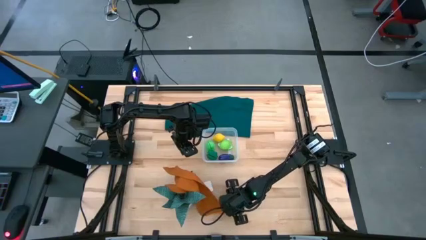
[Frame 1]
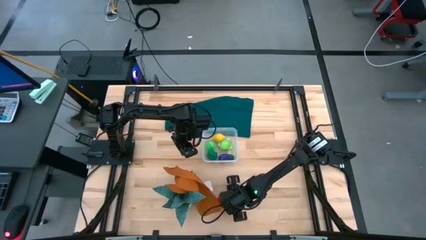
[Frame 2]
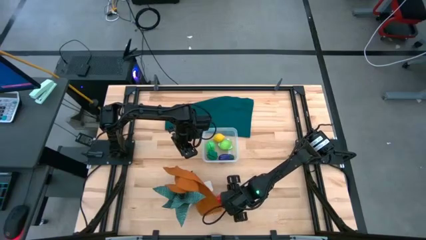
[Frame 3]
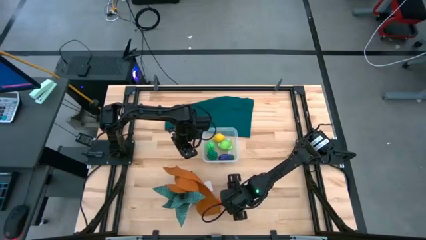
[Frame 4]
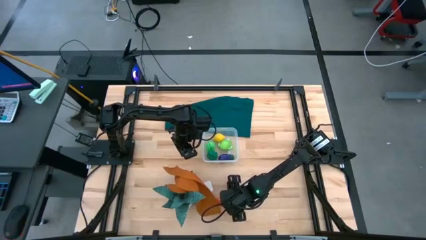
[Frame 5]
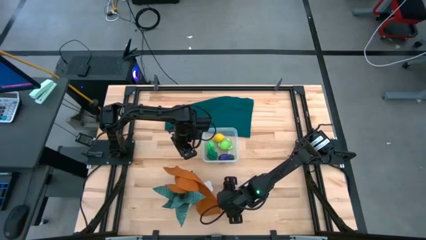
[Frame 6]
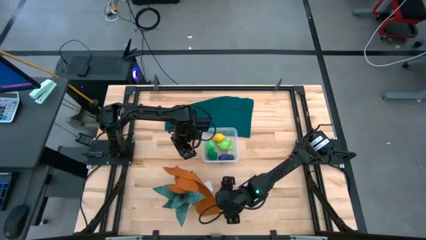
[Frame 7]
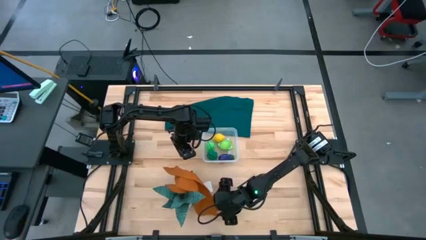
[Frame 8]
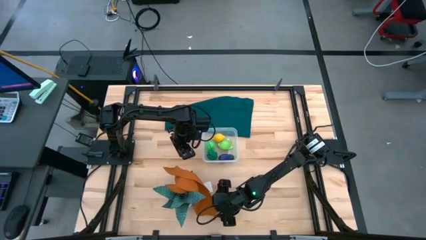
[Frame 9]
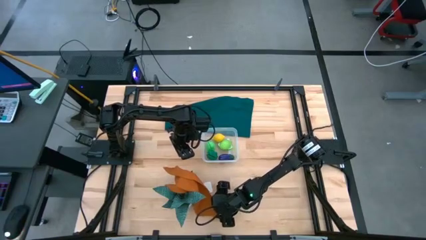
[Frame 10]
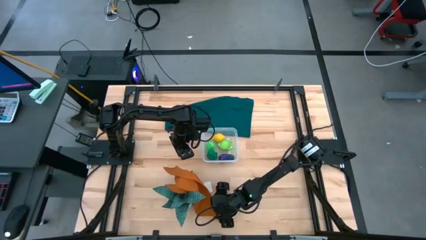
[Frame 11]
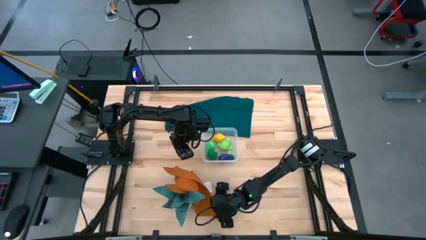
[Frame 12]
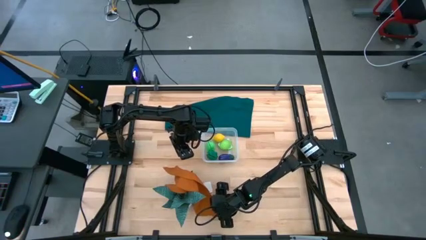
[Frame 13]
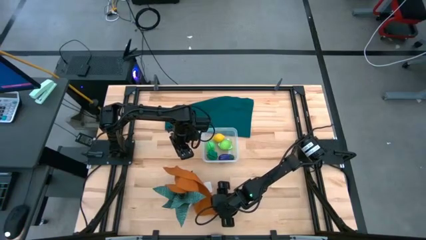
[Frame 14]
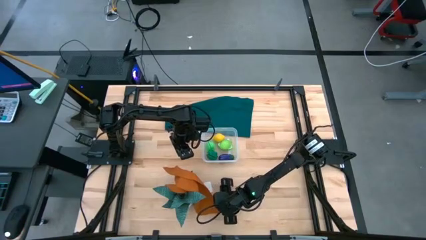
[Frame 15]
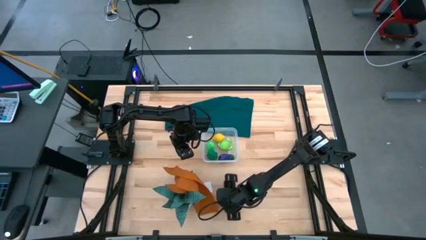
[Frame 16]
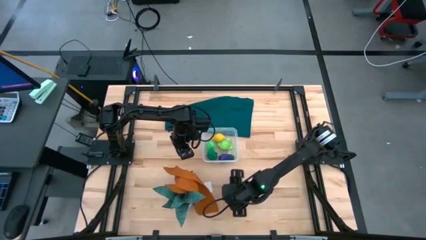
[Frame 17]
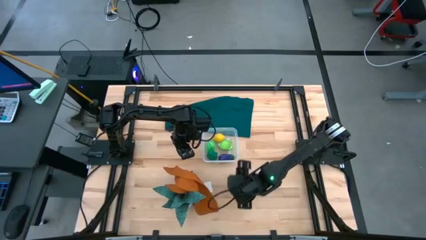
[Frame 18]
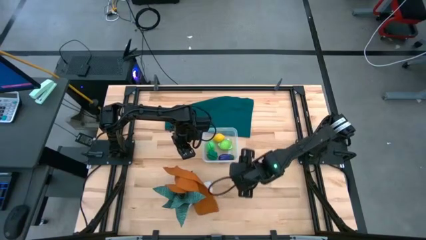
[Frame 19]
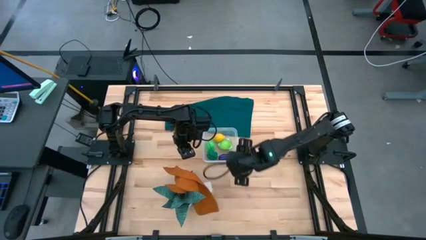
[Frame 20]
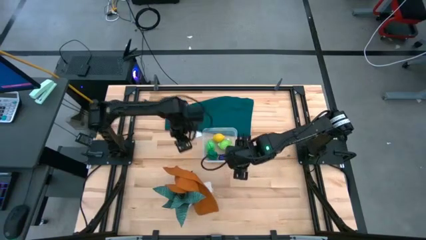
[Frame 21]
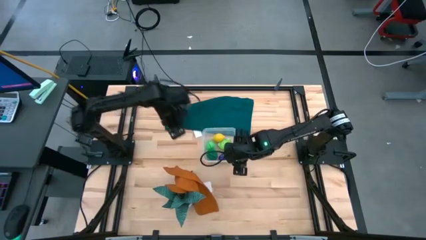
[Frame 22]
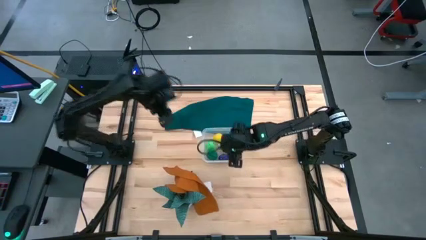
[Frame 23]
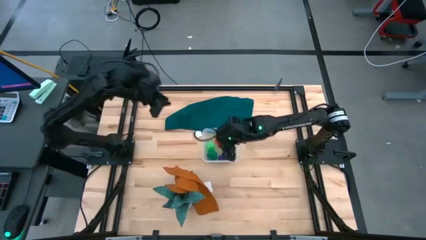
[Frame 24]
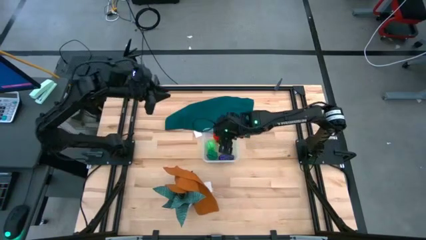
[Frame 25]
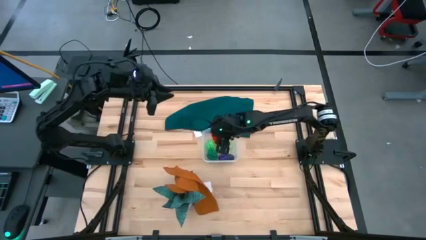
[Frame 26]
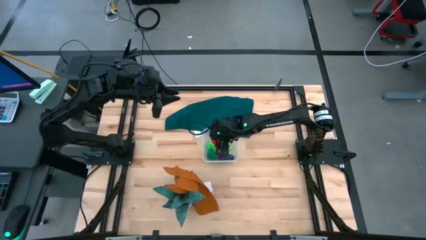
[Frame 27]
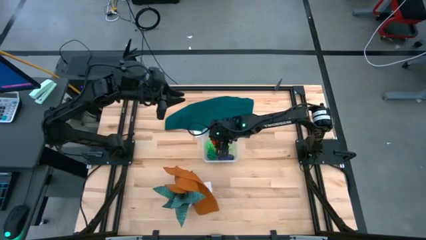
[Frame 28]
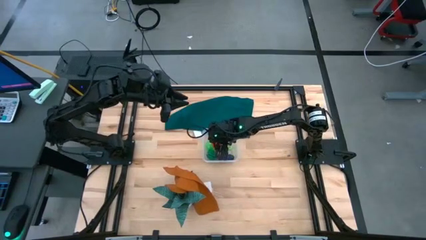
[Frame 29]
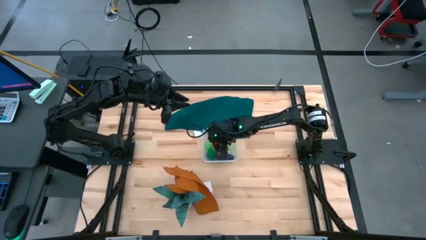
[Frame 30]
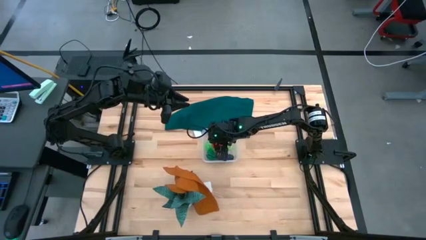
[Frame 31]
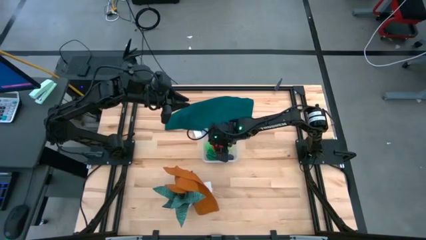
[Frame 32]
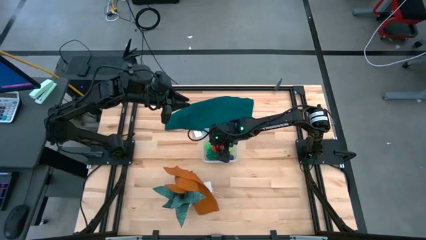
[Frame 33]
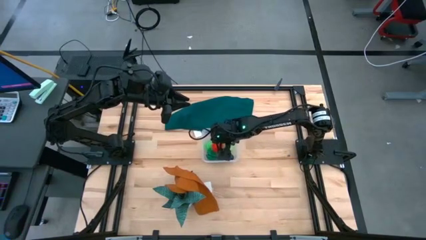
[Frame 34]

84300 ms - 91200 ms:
Task: Pick and placing Produce into tupperware
Put the tomato into the bin

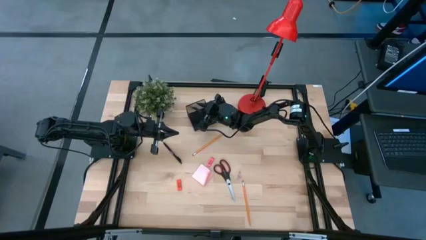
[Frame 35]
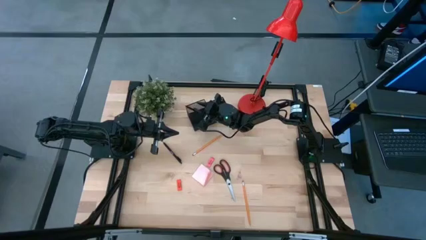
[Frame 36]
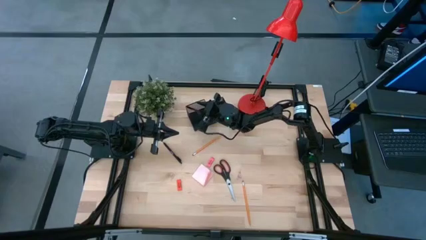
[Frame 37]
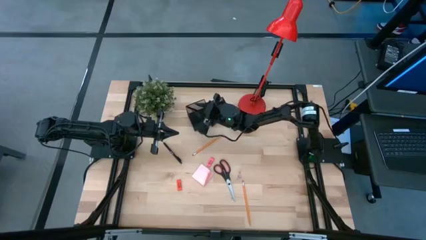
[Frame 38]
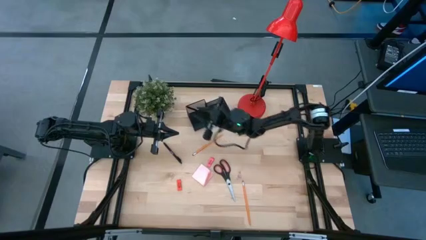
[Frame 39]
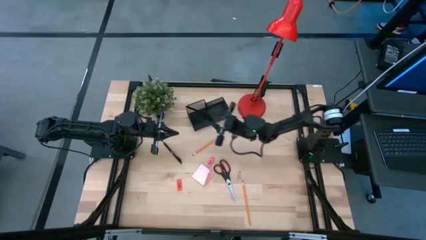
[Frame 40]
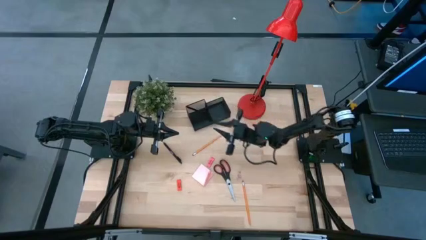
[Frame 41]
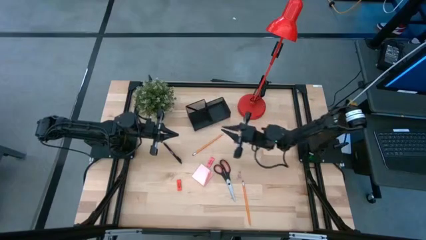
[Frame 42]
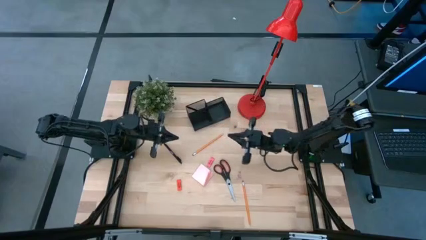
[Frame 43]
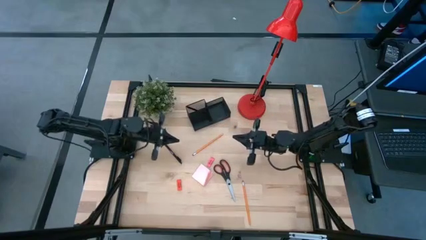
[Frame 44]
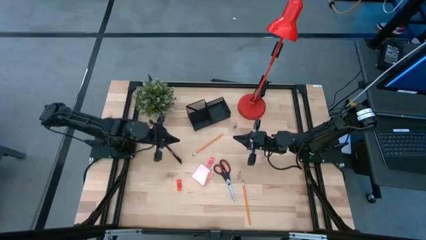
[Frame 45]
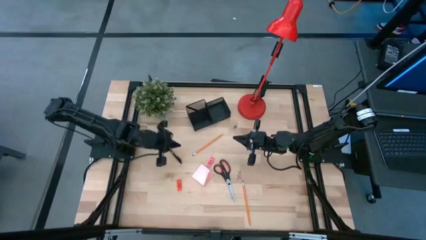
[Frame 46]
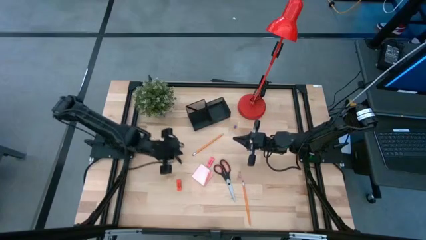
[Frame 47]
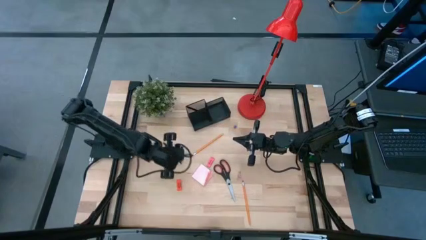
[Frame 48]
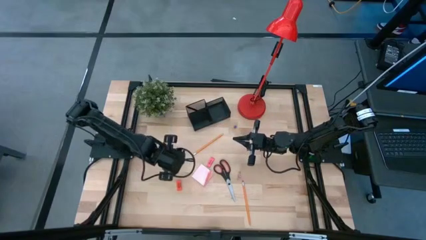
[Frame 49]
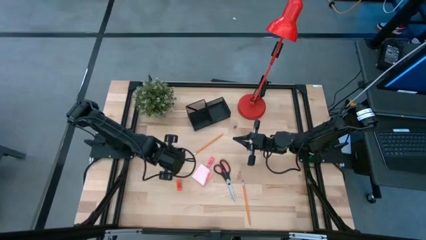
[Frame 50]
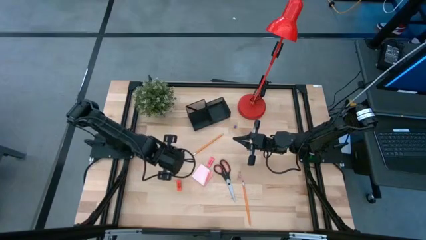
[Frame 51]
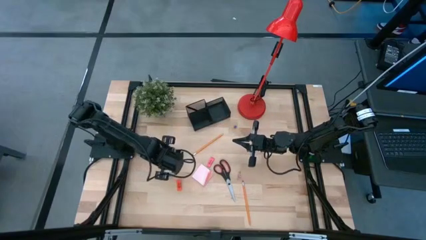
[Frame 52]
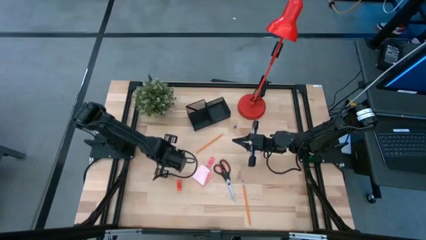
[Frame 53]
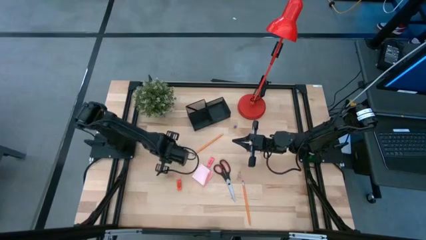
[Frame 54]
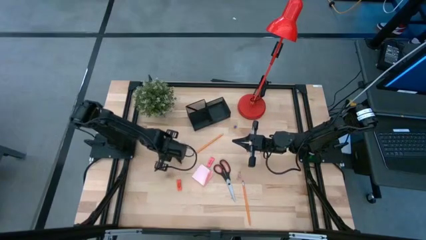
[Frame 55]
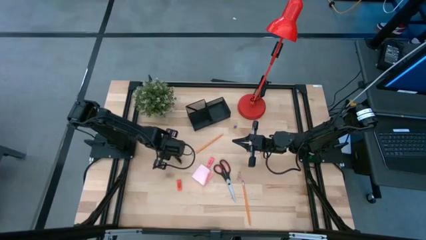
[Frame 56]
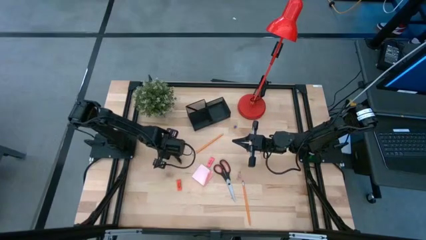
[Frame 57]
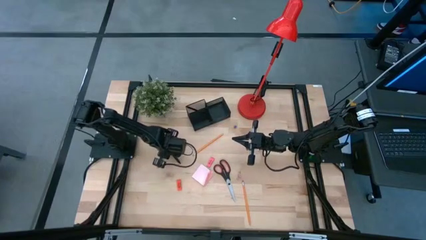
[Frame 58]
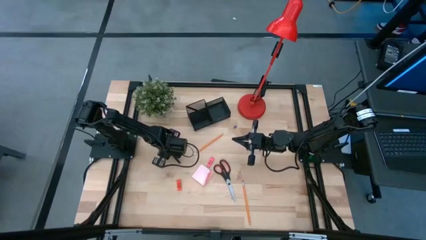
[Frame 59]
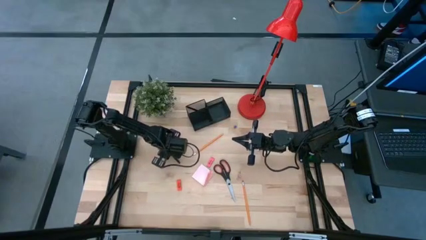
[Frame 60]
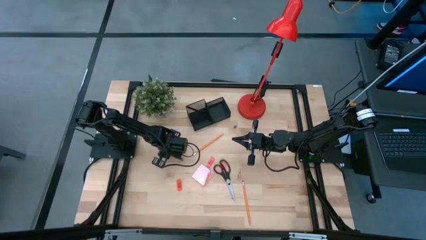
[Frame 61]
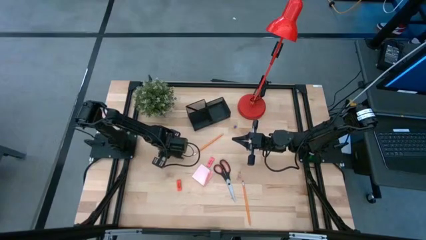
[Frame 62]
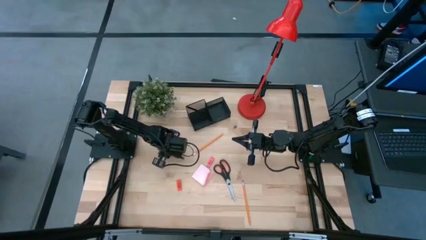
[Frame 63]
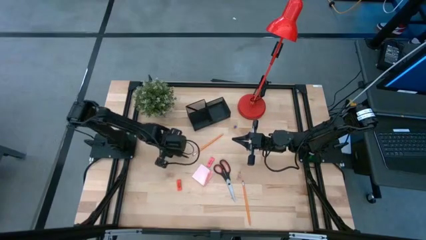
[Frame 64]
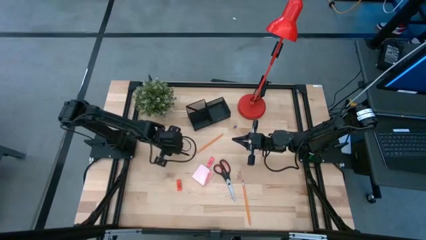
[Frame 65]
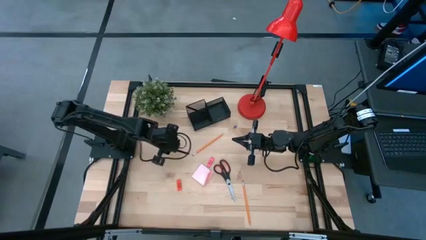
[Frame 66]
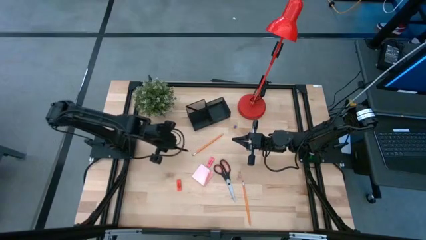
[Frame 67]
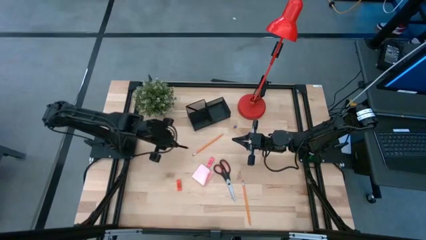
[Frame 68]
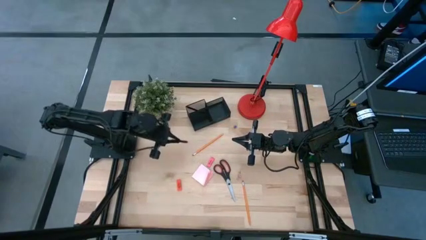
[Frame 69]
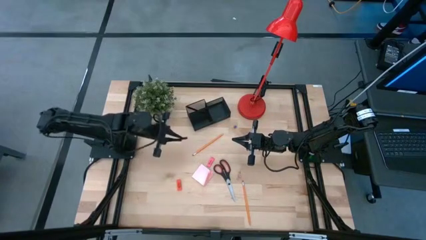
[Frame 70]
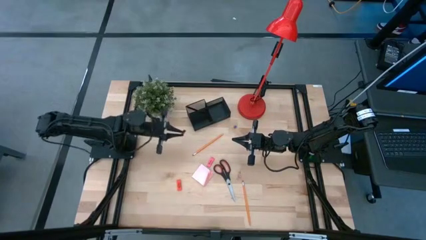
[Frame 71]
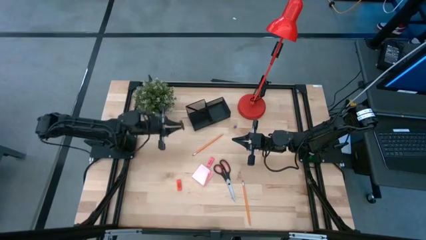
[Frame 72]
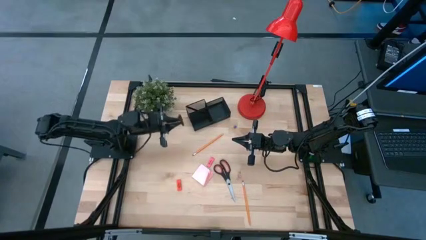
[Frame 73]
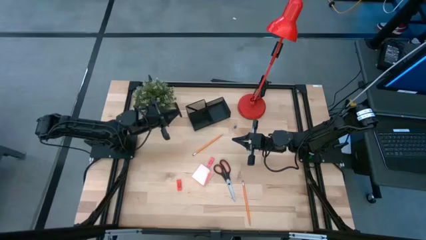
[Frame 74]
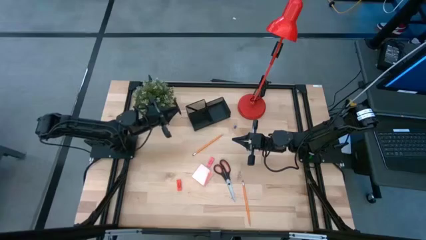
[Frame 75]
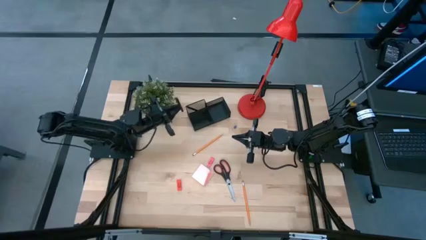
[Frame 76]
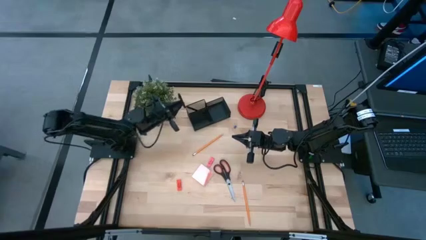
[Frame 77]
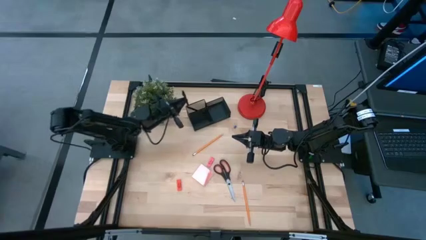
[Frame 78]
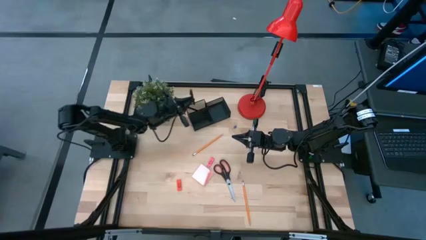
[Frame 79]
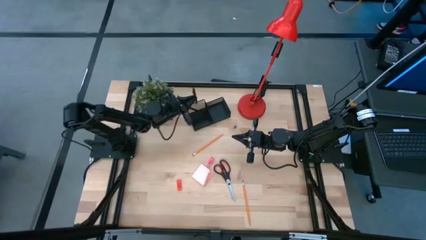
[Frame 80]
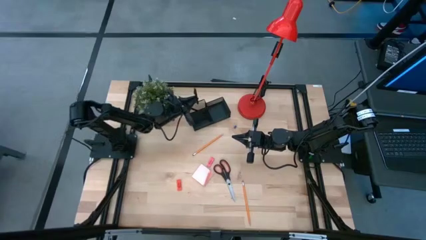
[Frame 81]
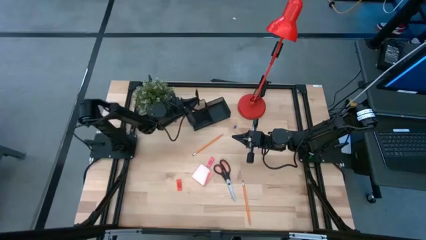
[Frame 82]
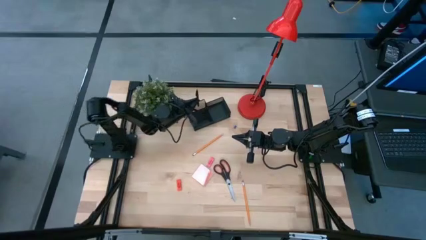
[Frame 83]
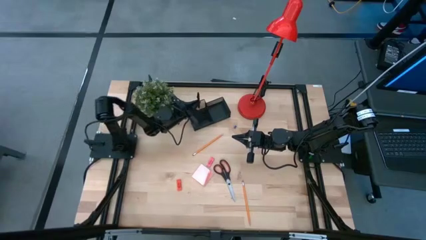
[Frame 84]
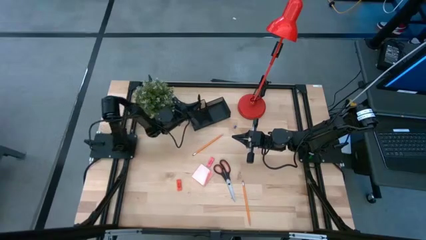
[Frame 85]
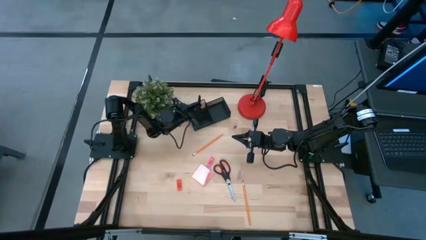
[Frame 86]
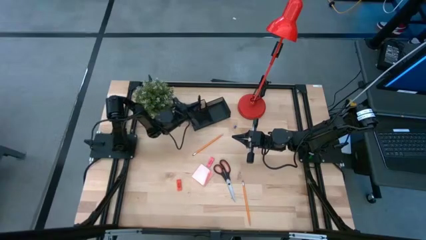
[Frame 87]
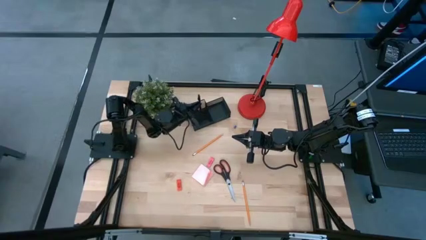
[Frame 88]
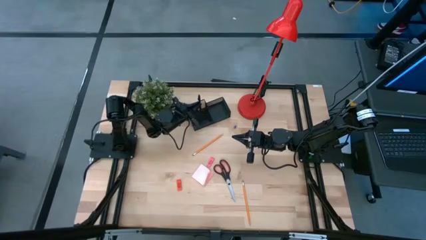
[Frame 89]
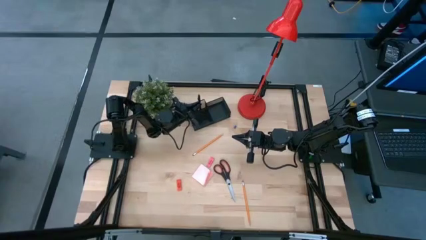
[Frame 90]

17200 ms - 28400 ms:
Task: Pick and place office supplies into organizer
Put the black pen into the black desk organizer
